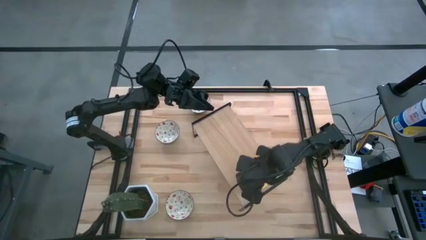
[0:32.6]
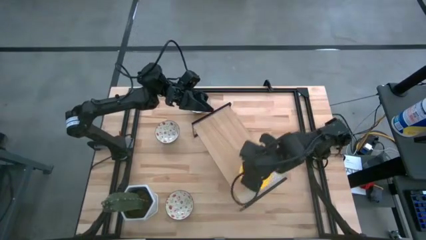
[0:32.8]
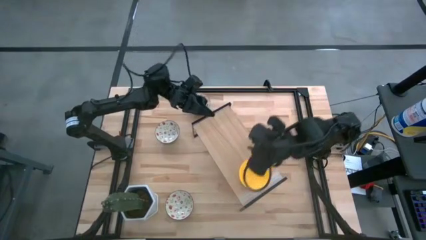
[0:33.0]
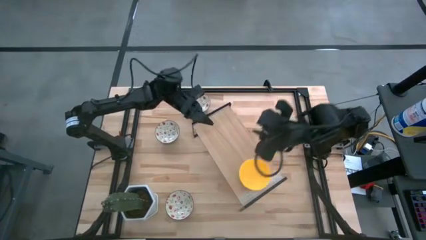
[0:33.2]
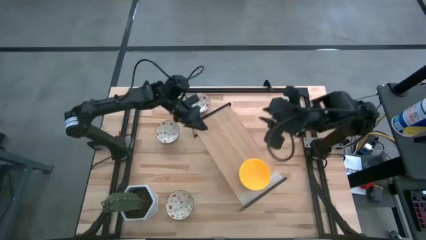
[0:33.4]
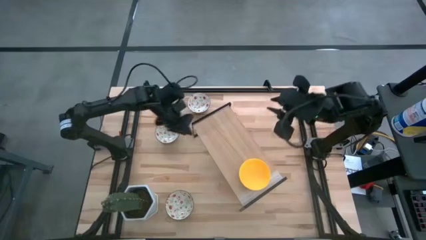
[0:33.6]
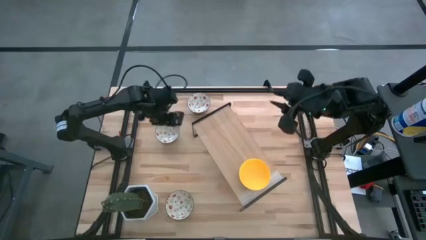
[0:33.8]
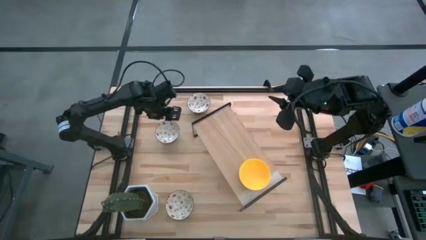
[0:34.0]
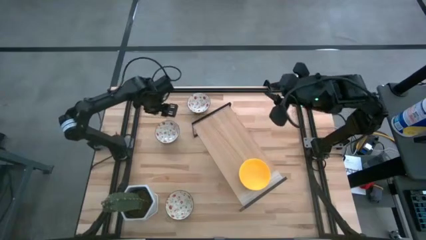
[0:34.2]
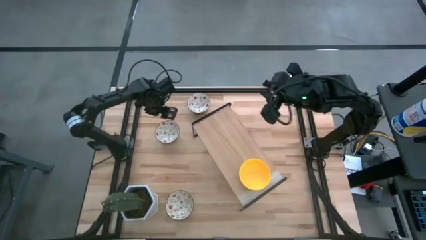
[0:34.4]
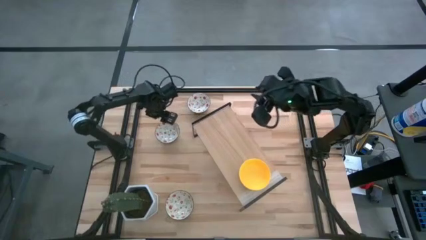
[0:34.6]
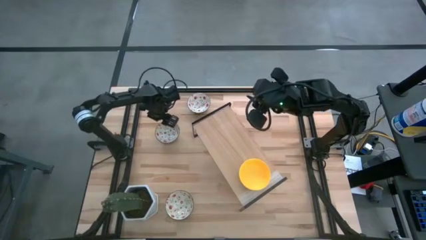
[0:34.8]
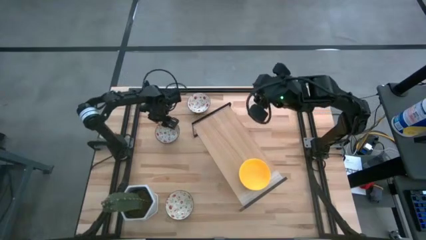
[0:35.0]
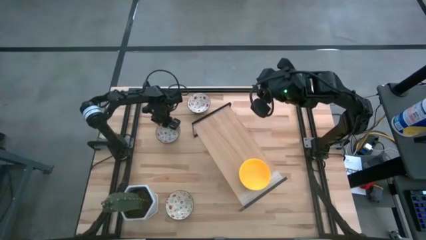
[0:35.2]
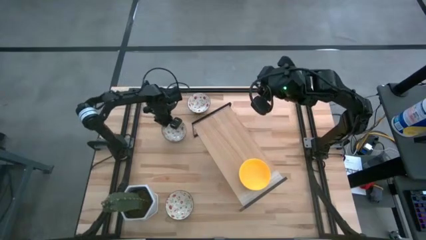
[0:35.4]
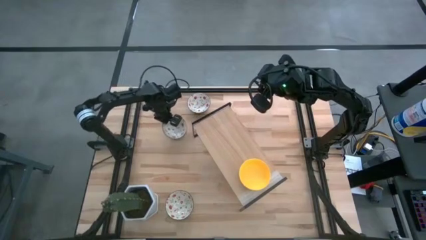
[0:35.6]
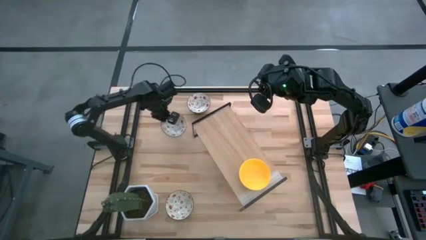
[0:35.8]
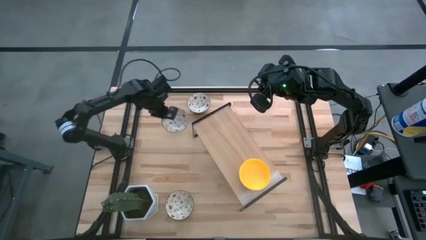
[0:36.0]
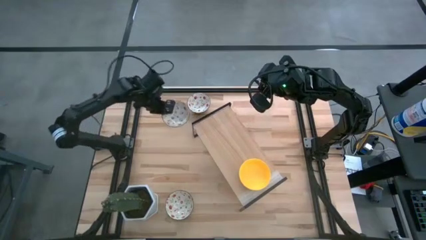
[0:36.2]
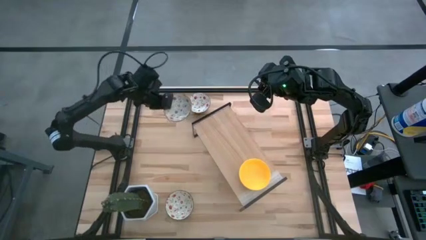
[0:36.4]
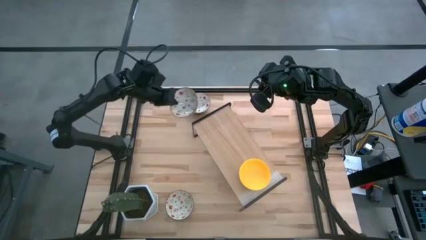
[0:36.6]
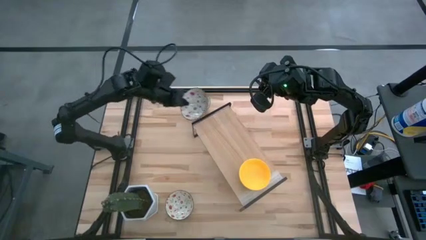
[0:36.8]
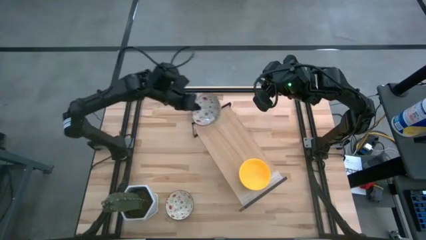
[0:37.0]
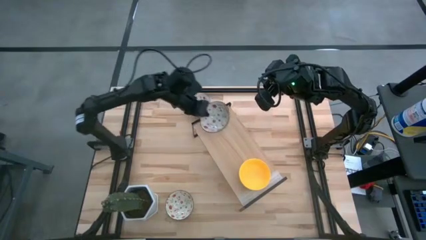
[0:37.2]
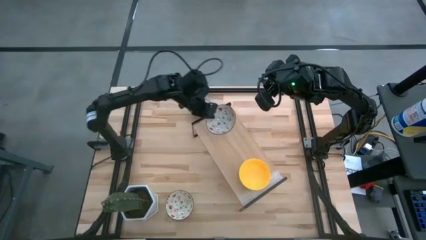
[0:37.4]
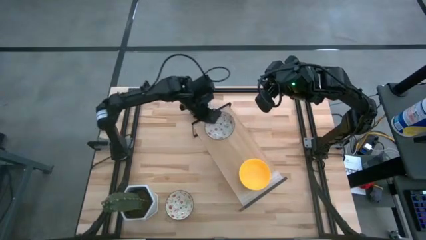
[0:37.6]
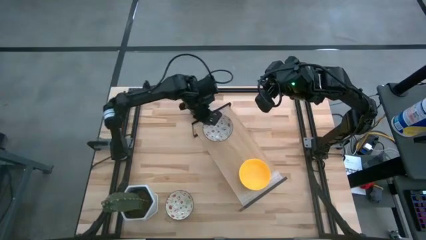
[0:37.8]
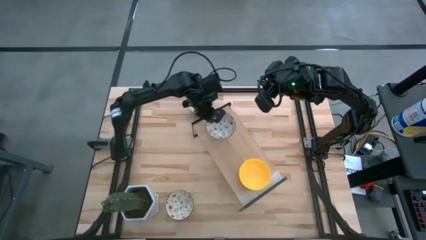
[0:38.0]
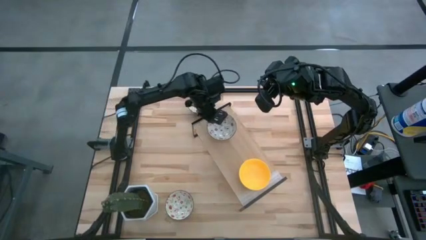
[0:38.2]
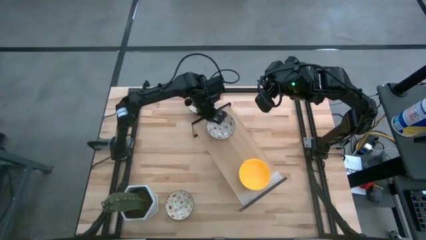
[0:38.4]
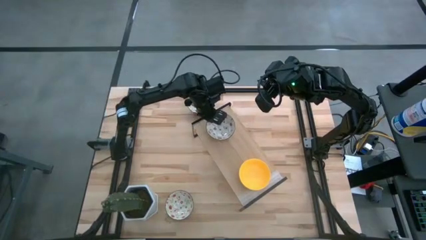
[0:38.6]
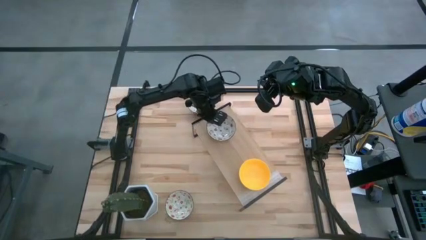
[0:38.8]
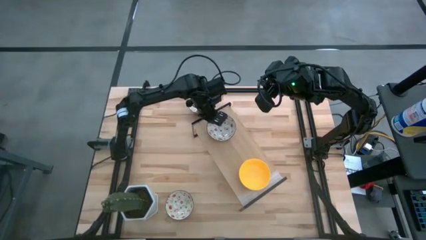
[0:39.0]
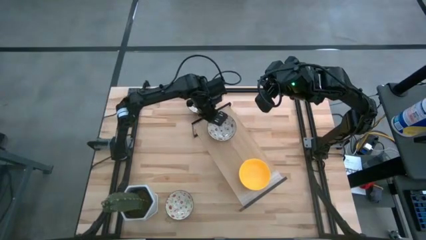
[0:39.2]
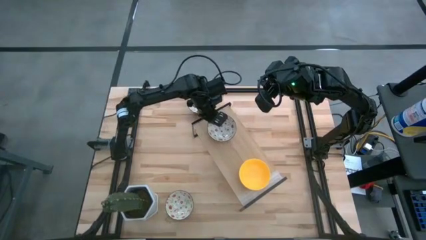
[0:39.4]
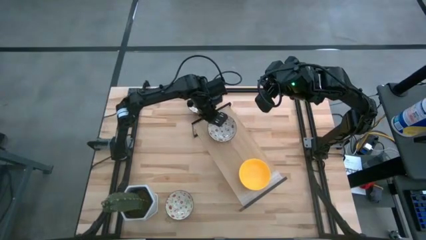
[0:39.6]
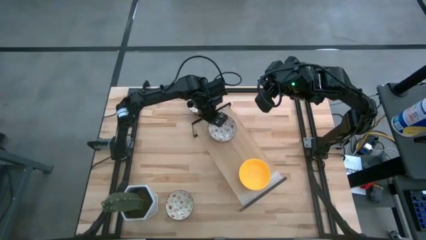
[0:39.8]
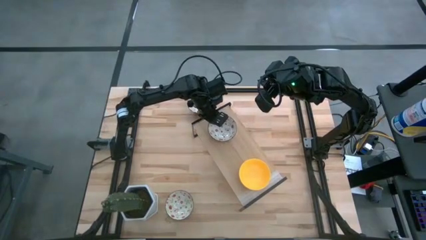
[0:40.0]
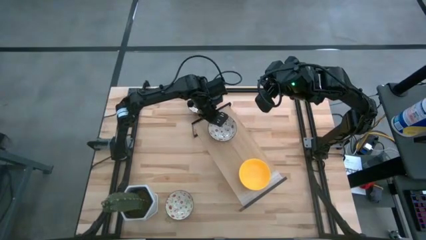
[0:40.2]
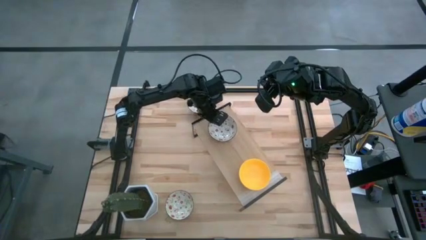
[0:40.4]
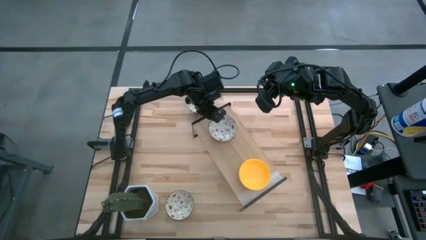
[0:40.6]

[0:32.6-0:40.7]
Task: Pick & Place Mini bowls
Put the middle left white bowl on the shelf

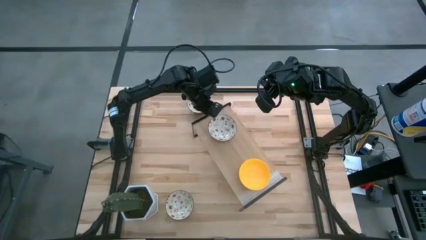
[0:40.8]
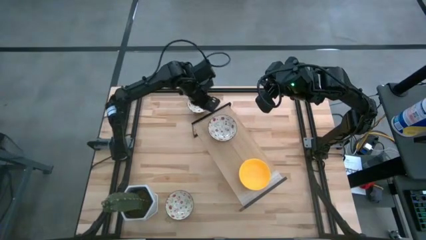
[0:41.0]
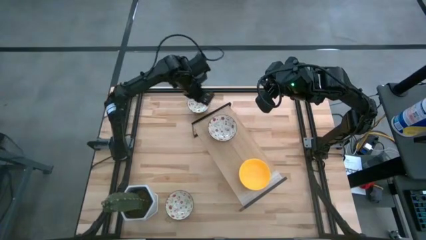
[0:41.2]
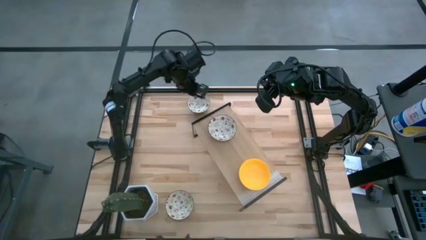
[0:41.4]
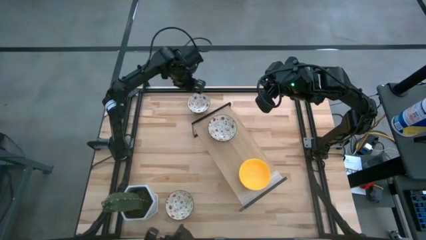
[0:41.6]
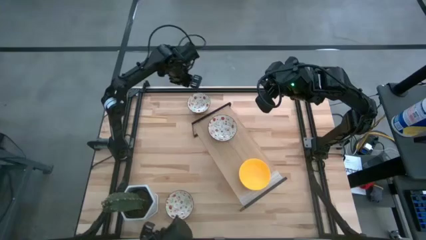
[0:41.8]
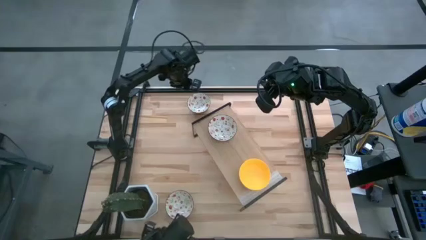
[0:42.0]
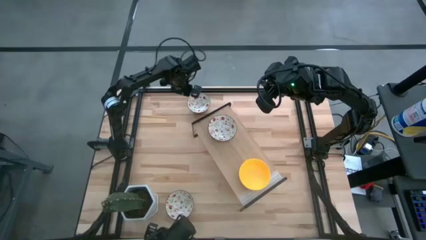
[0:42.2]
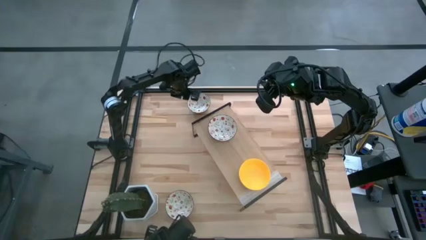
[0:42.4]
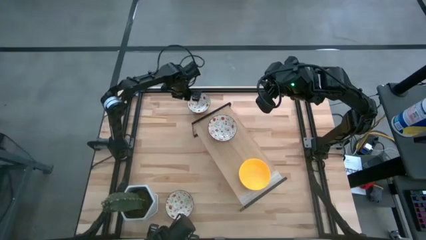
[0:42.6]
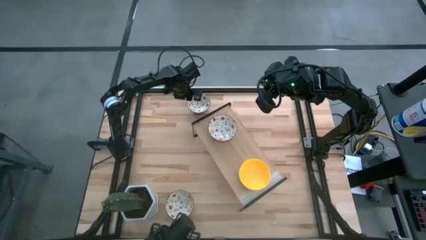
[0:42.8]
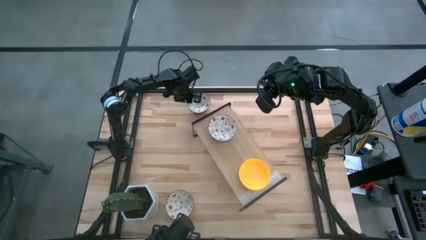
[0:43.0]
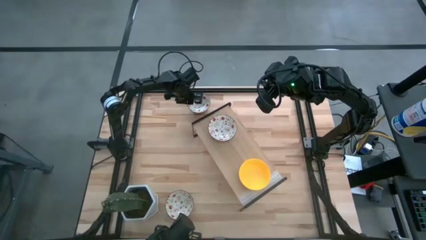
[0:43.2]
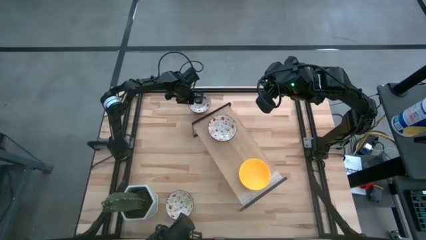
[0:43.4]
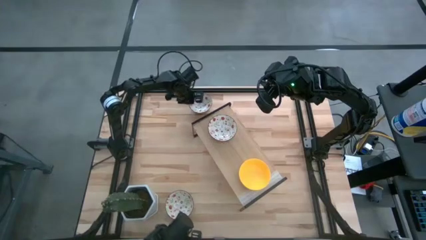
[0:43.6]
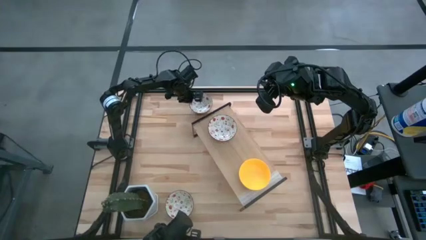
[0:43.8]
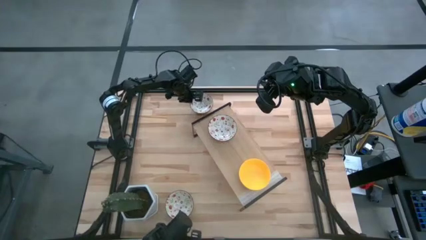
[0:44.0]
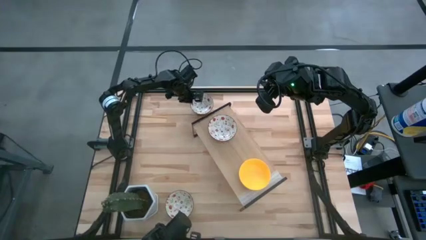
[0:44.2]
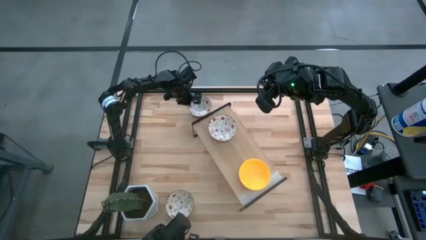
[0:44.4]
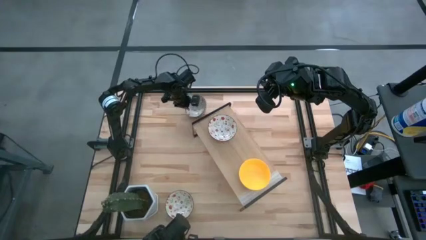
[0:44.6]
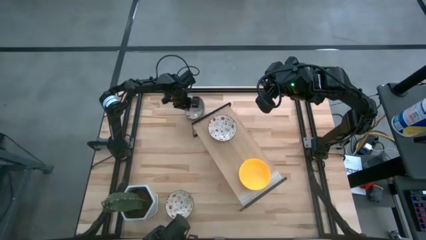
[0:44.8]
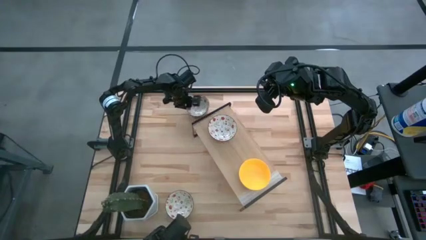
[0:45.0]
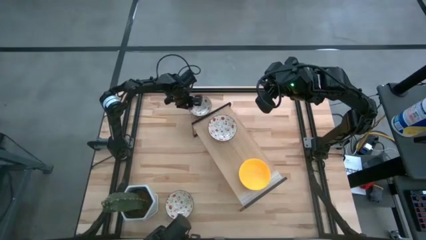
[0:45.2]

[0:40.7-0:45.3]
Stack the top white bowl on the white bowl on the shelf

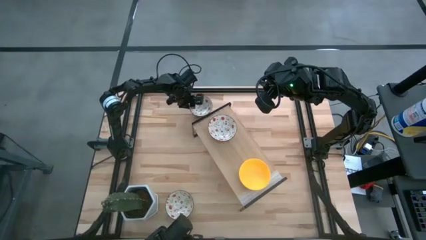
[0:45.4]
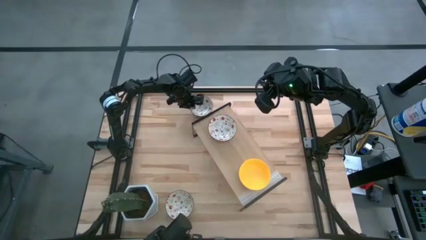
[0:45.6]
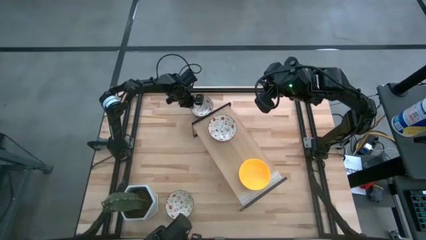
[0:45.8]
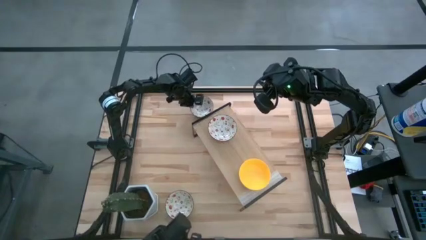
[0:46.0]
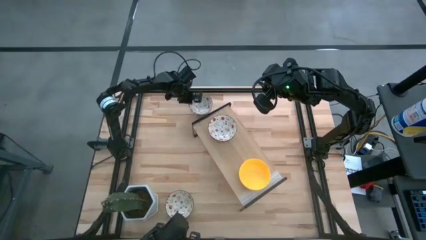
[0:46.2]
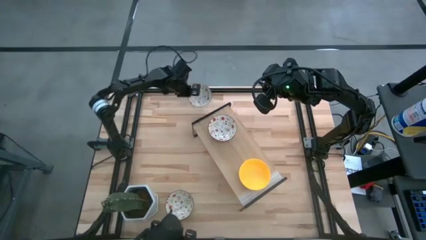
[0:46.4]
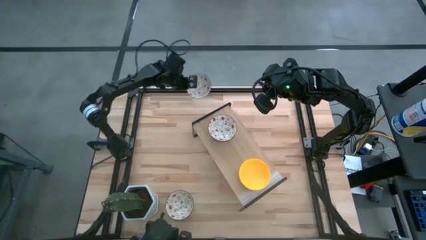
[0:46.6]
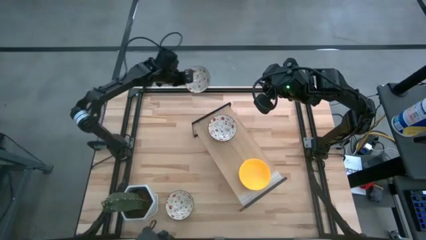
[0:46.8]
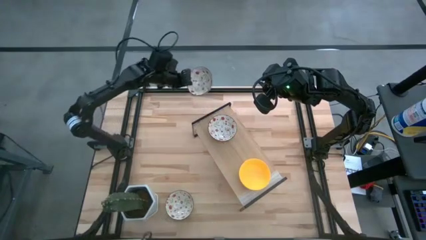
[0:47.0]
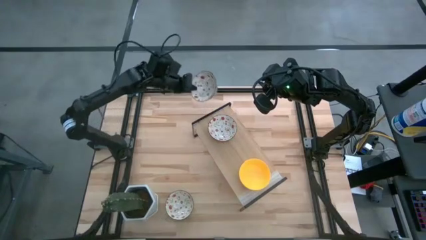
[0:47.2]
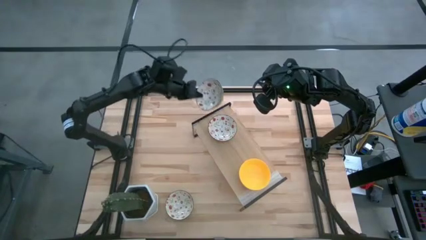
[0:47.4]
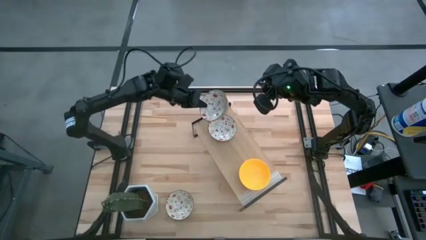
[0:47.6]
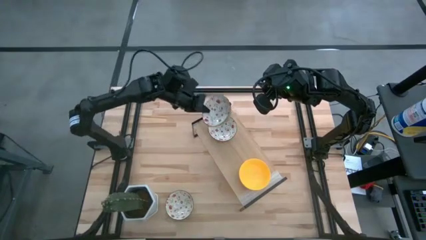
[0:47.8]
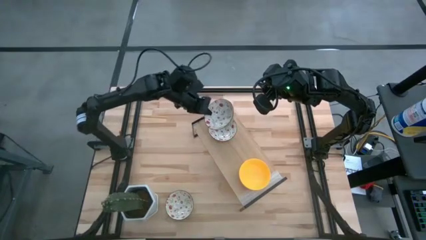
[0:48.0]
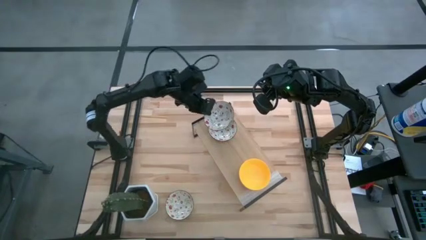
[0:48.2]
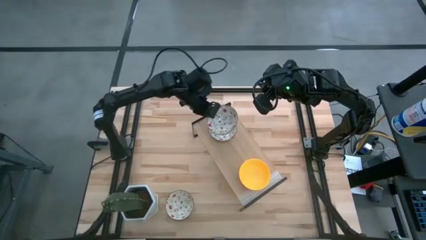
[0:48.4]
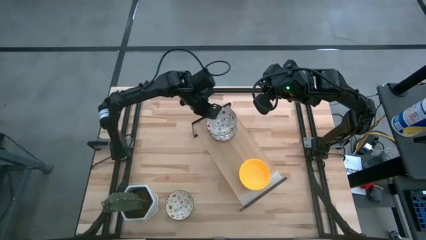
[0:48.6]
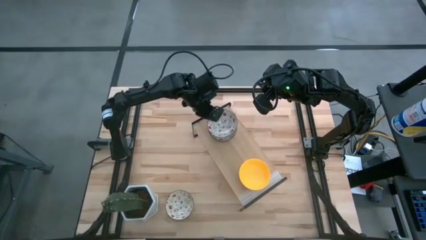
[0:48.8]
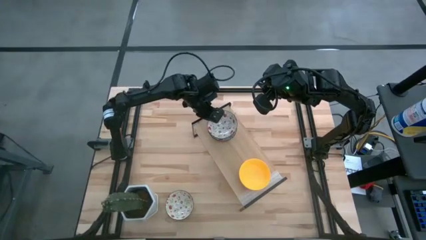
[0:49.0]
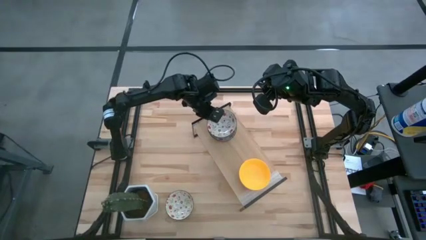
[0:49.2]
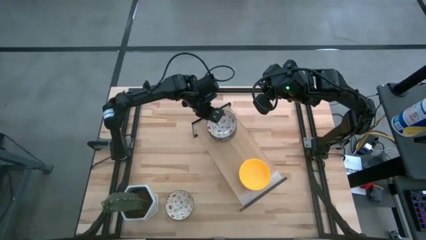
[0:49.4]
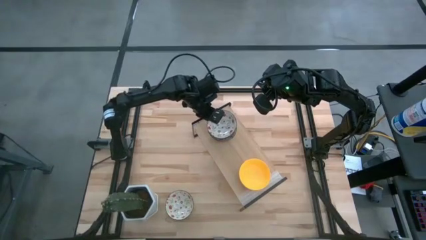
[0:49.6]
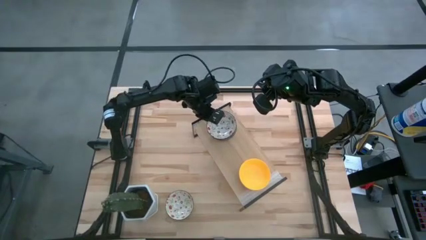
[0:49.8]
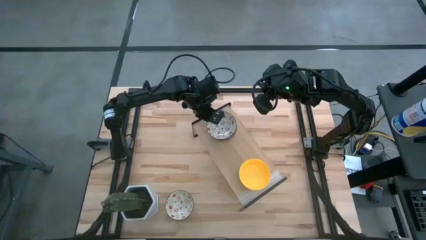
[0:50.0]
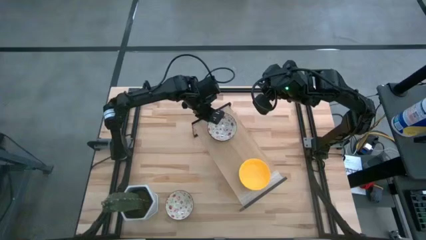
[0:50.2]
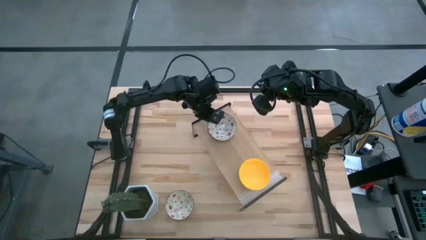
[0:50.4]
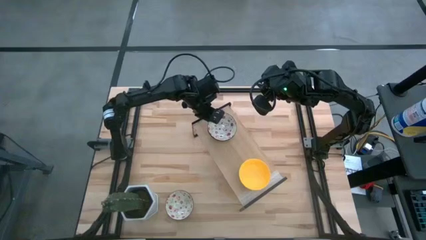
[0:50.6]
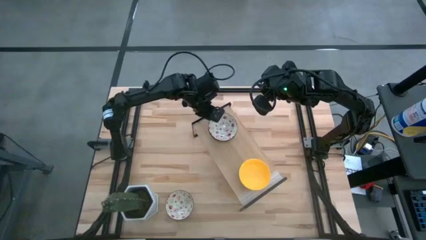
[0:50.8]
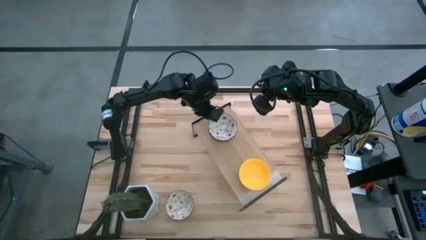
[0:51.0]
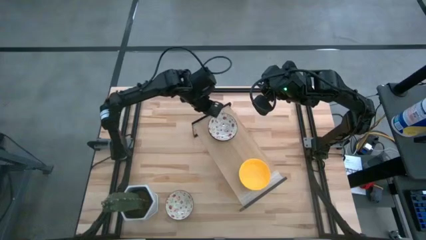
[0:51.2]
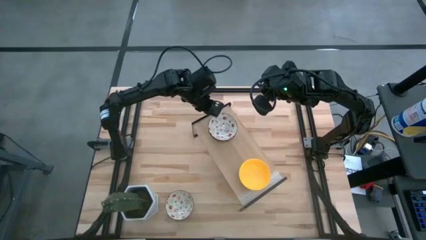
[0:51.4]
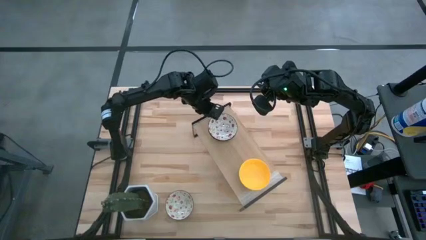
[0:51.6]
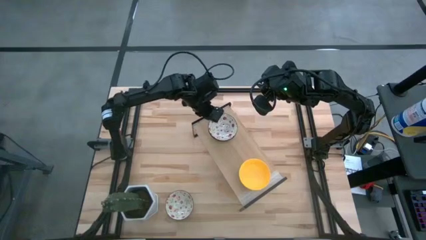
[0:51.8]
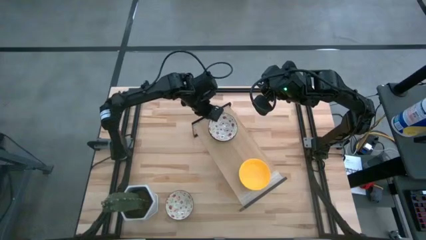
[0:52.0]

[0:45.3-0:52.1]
Stack the top white bowl on the white bowl on the shelf
